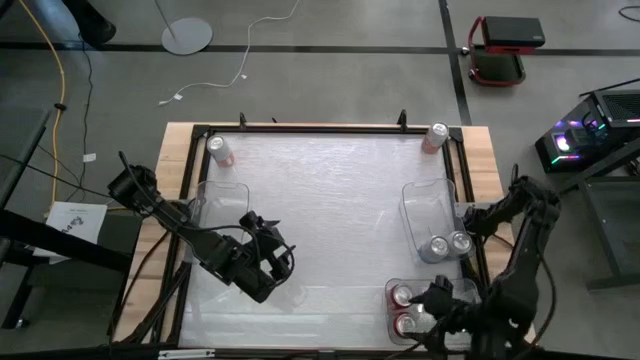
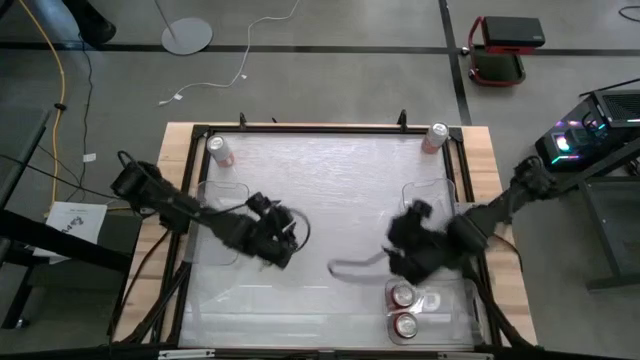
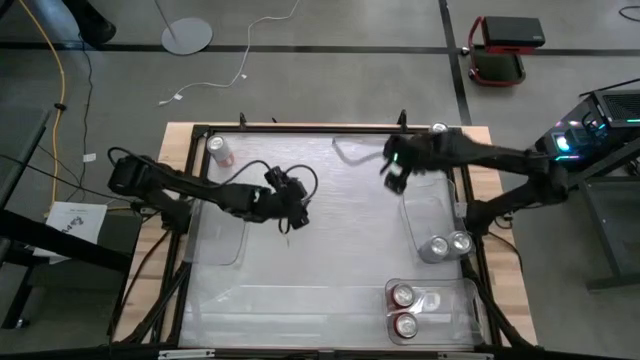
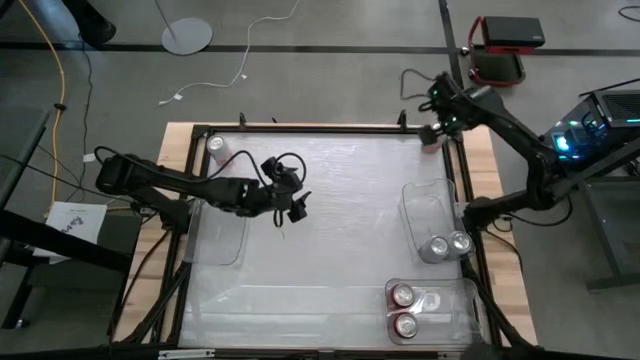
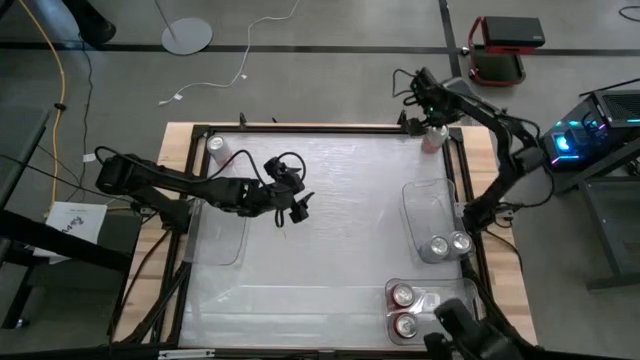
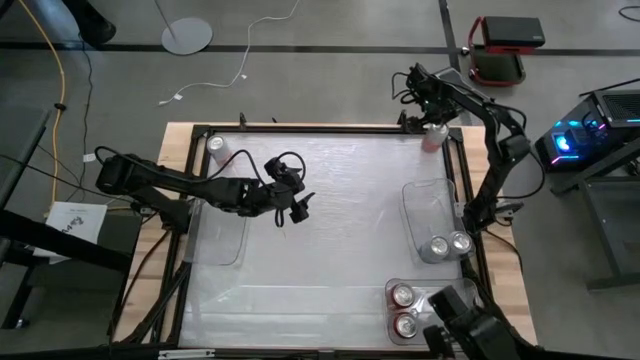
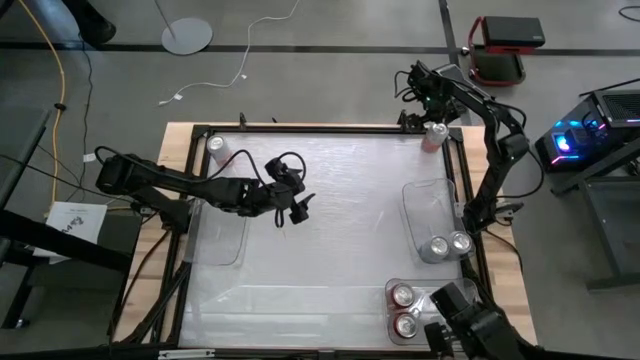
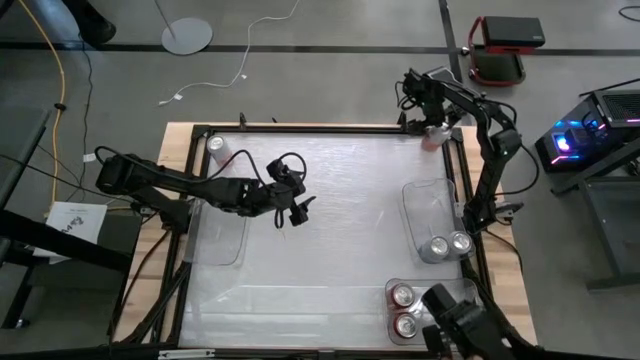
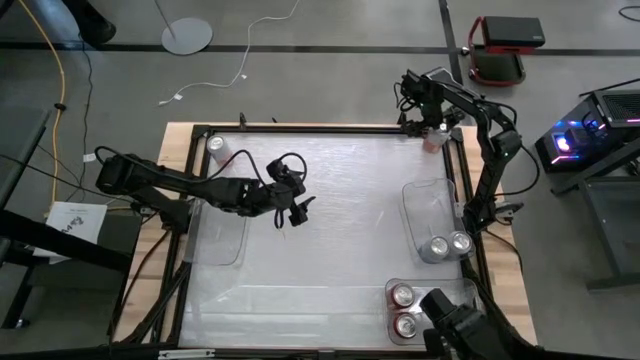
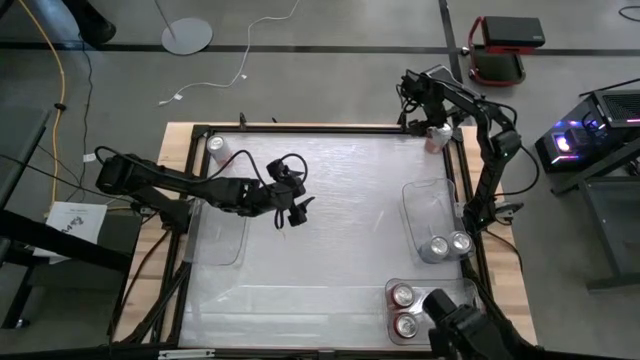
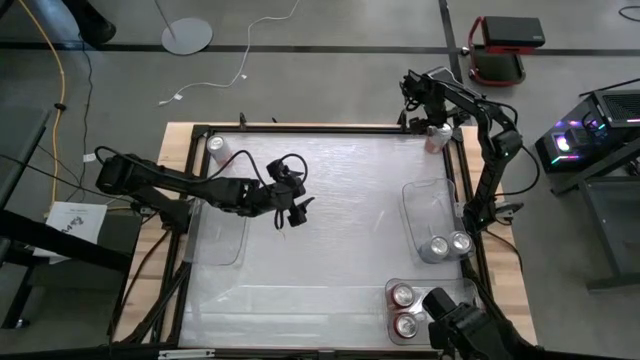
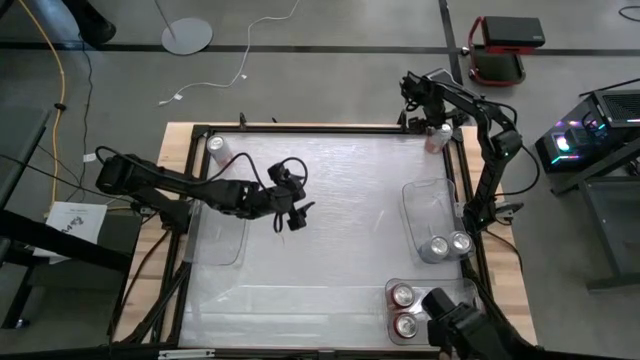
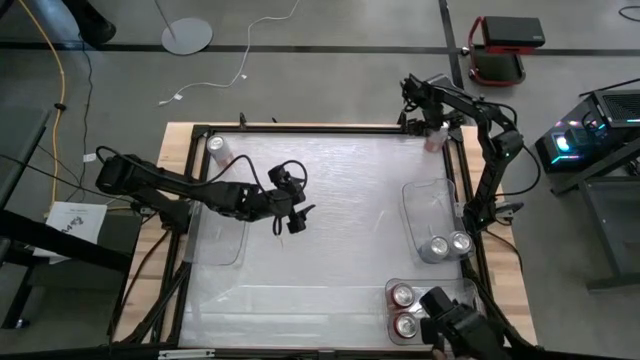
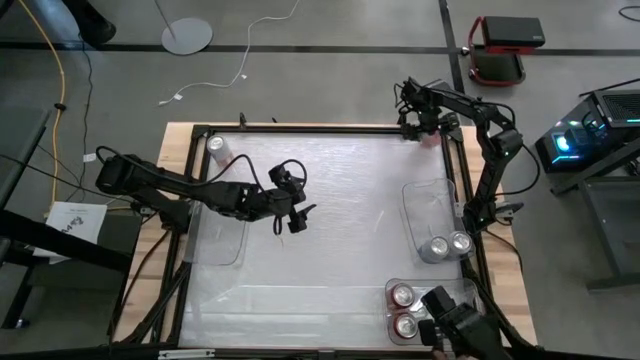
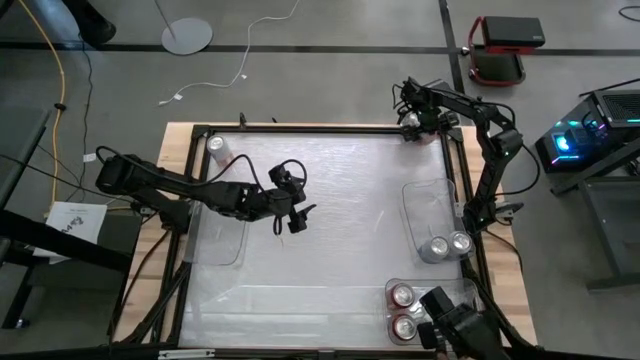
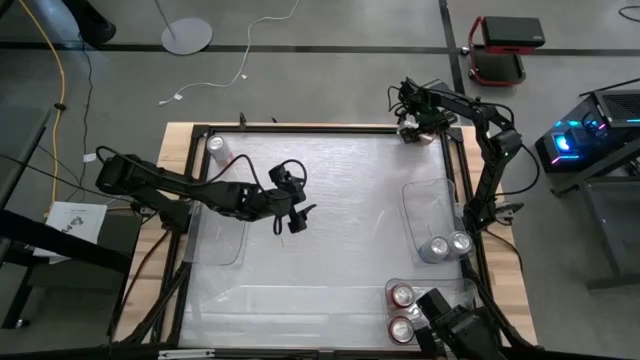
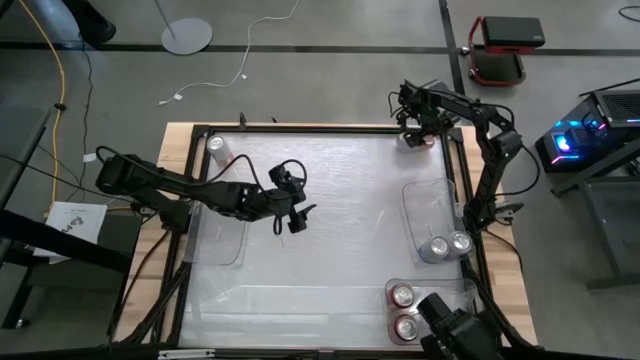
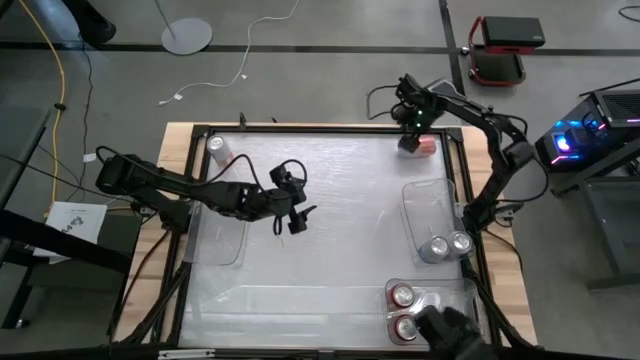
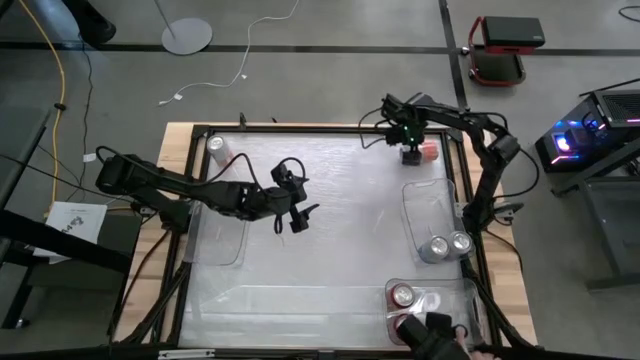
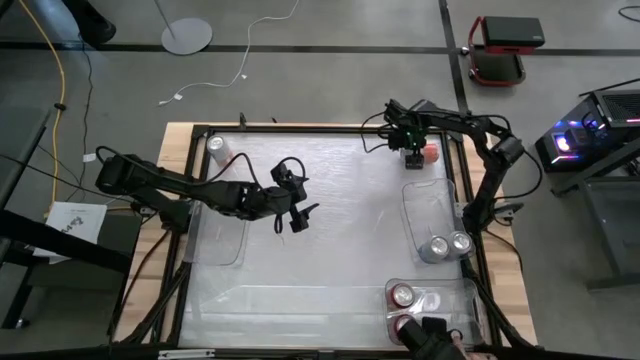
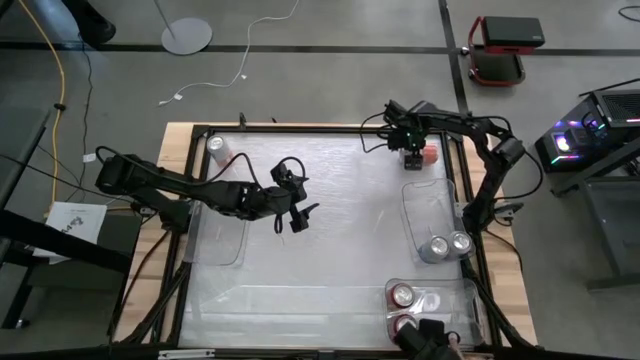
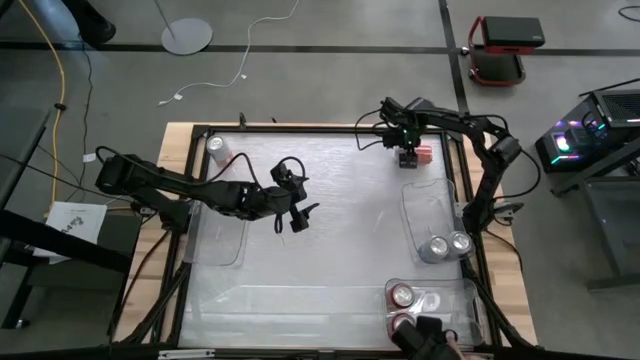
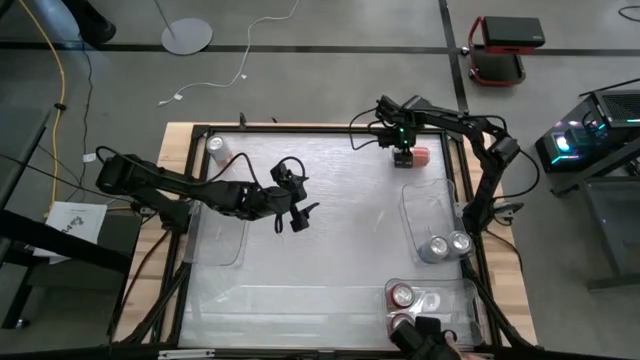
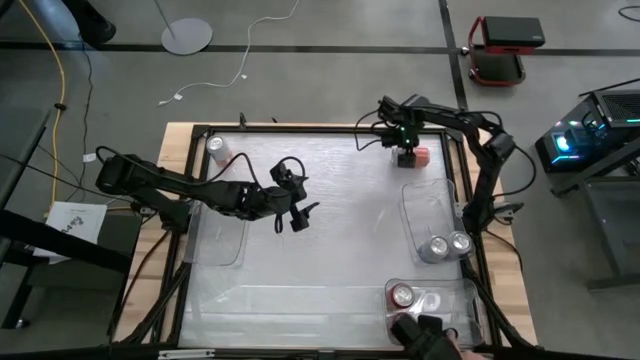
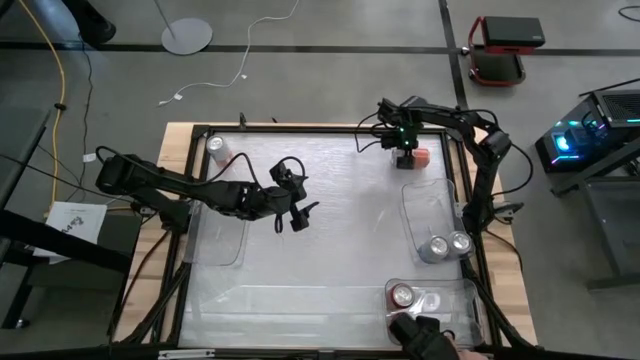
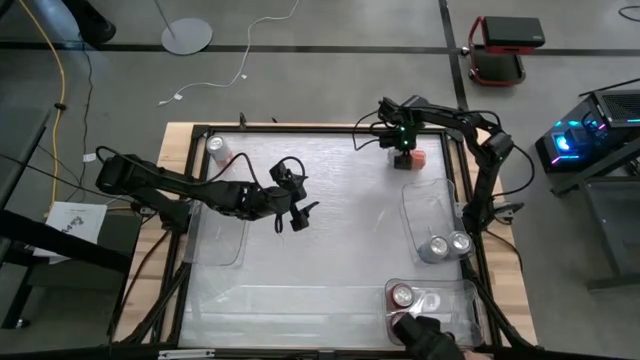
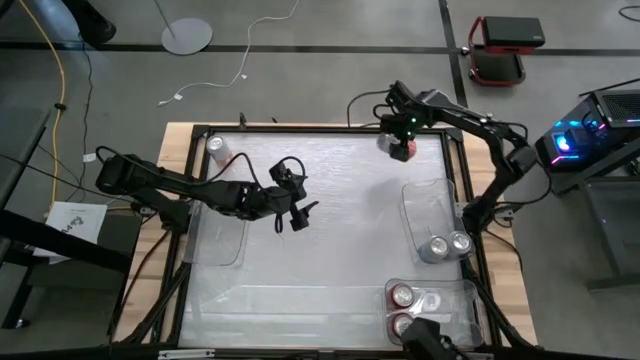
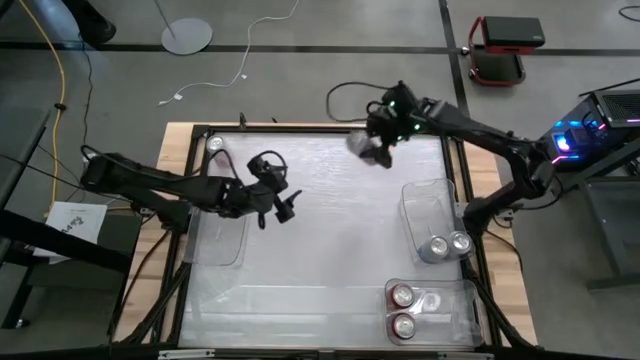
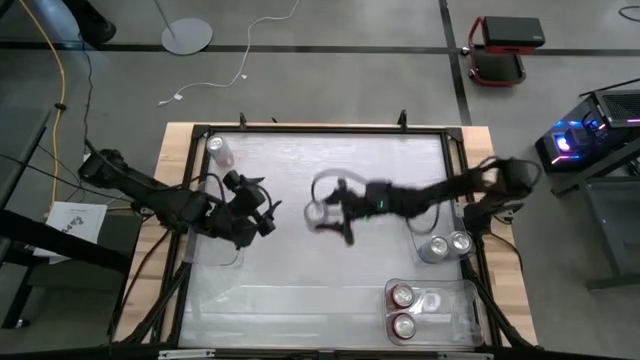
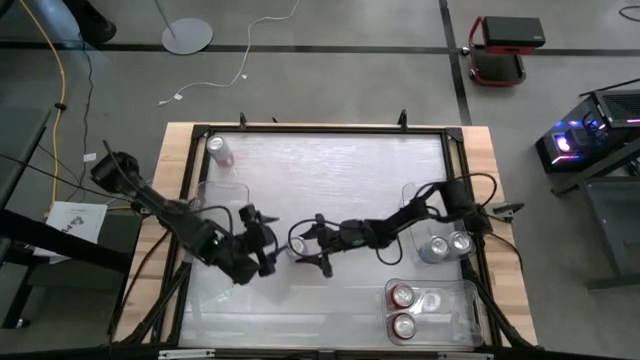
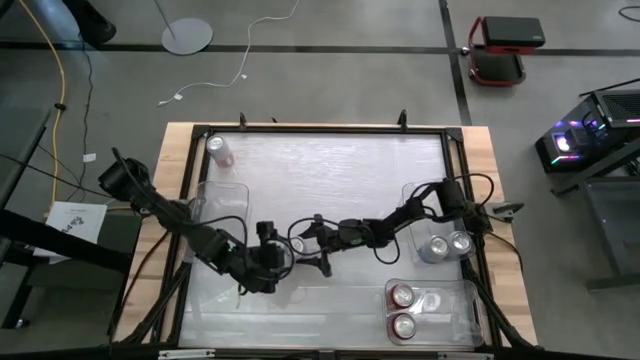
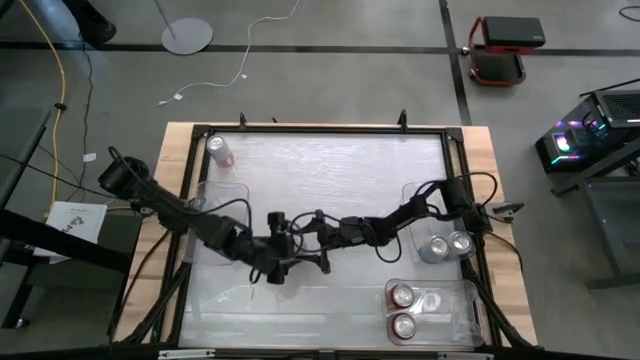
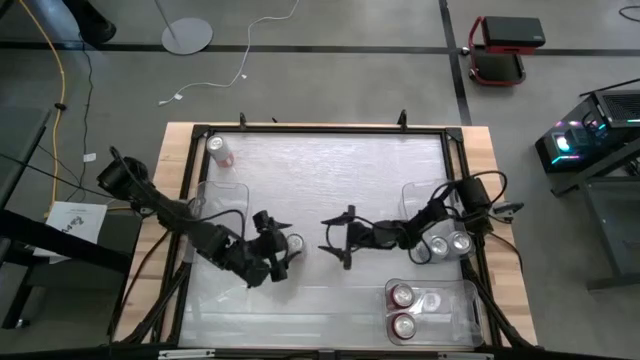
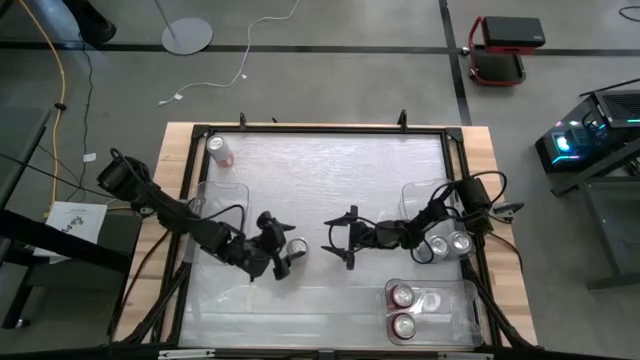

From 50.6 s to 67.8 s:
Task: Sort soda cans
Put the right orange-white soda can into the left transparent bin

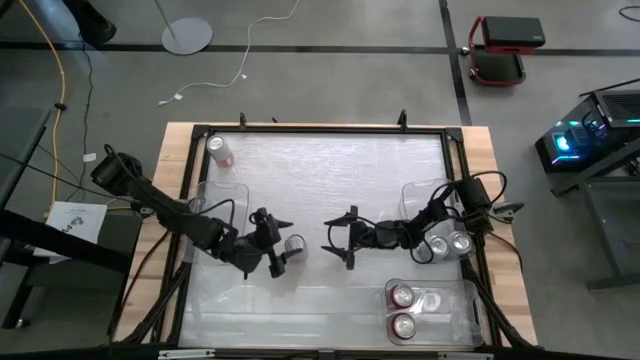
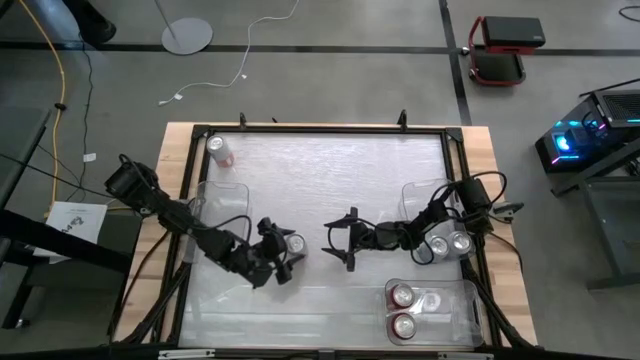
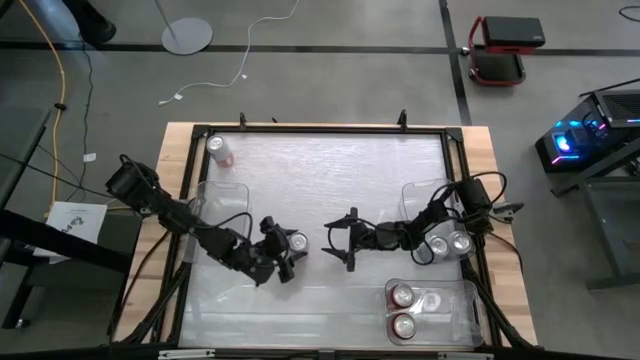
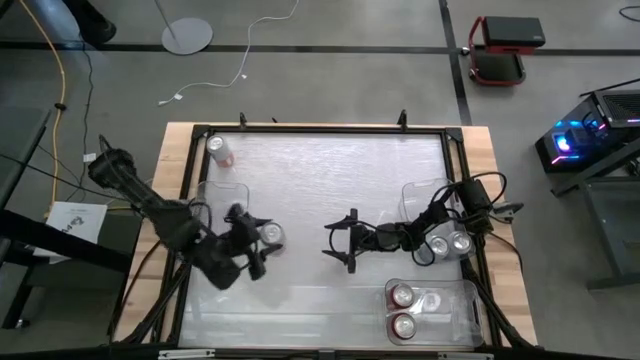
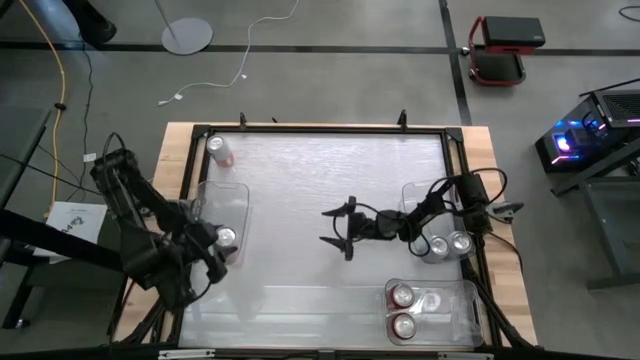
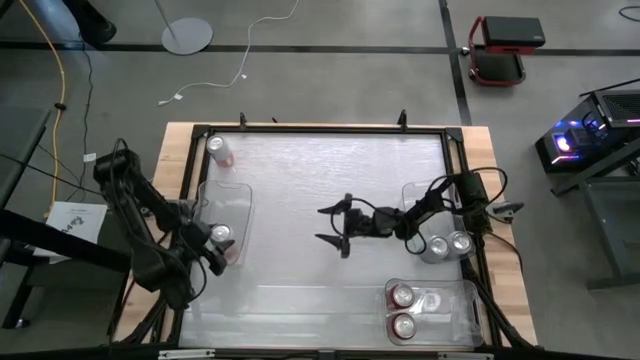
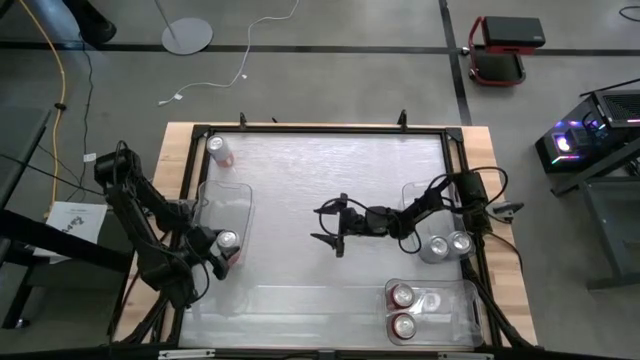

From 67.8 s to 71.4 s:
Put the right orange-white soda can into the left transparent bin

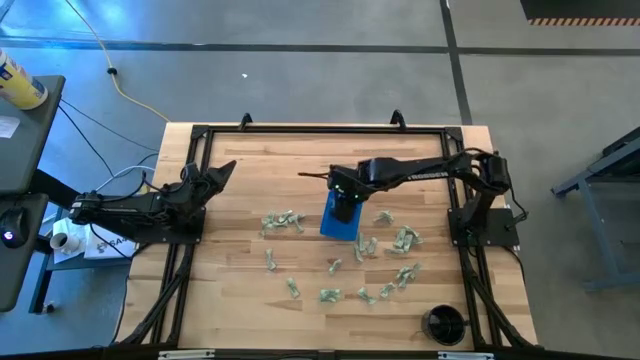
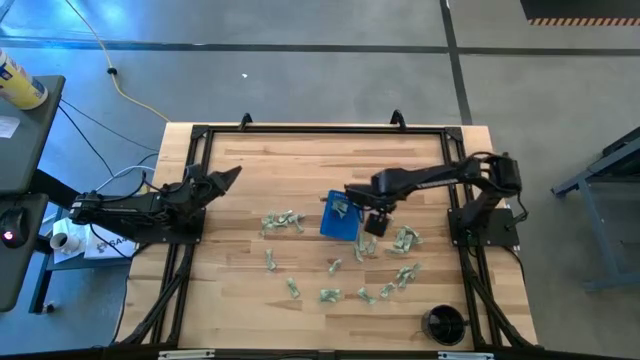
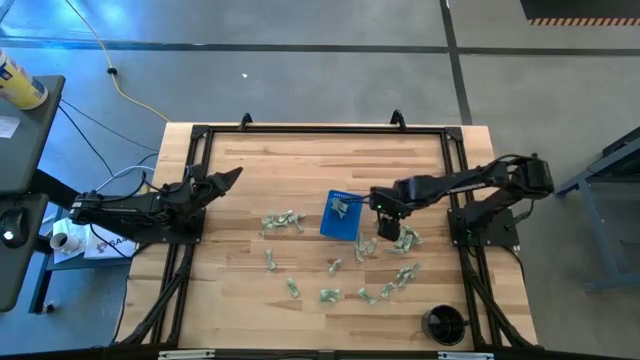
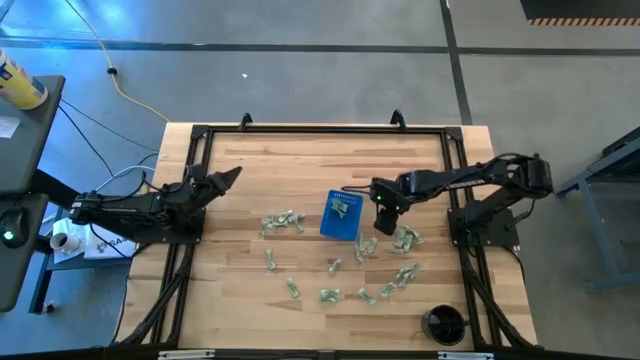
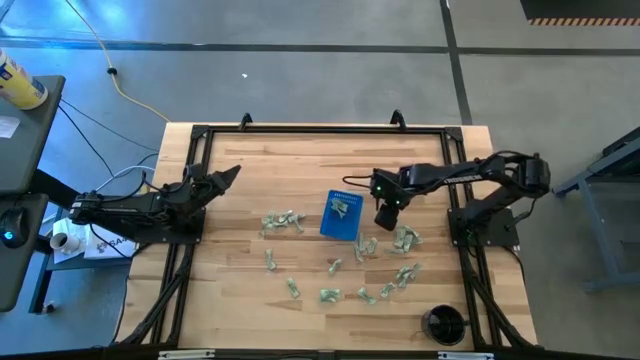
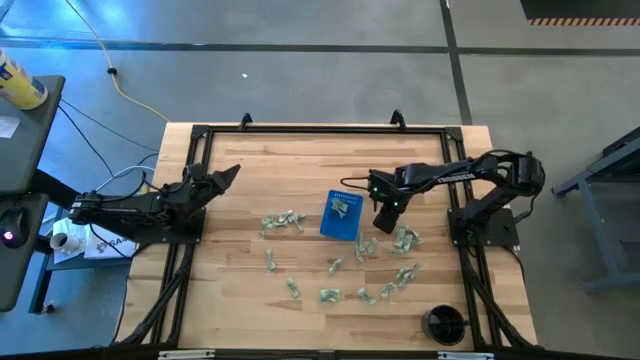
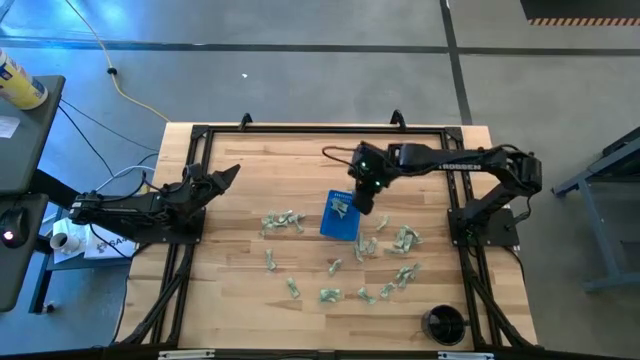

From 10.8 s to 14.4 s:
Task: Pick and place Stevia / Truvia into bins
Put the stevia packet into the blue basket
